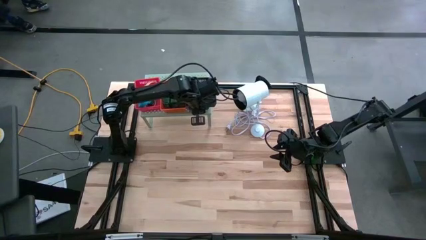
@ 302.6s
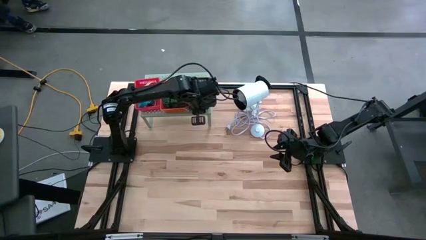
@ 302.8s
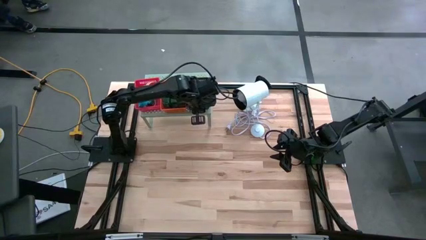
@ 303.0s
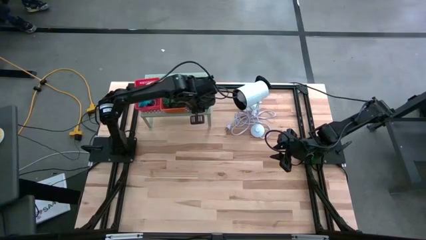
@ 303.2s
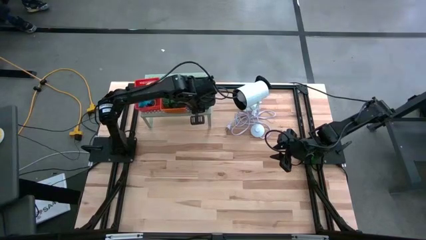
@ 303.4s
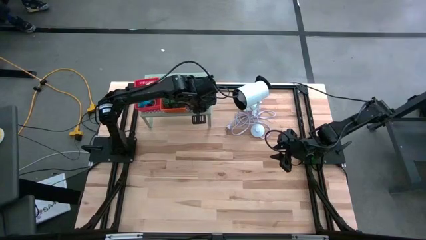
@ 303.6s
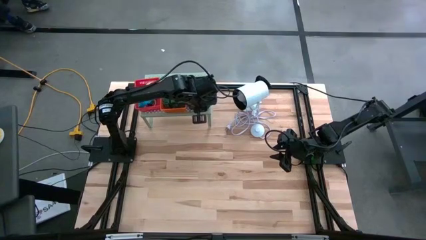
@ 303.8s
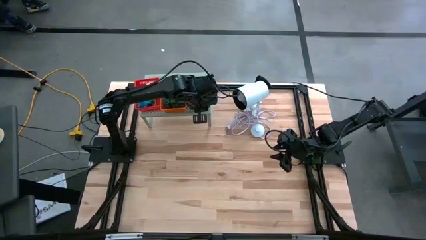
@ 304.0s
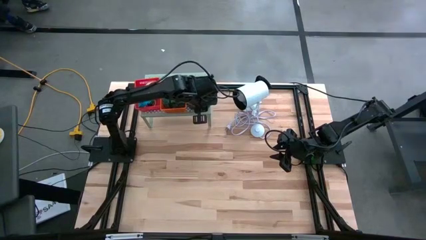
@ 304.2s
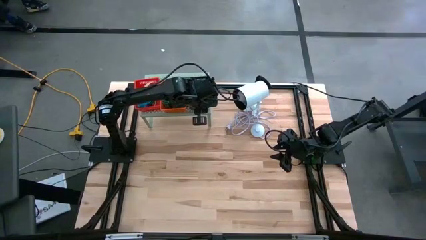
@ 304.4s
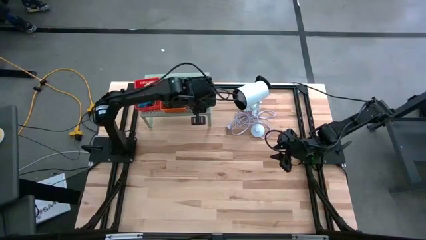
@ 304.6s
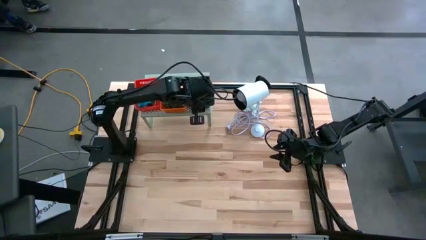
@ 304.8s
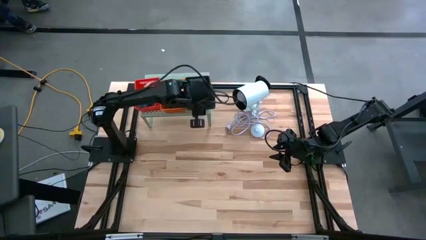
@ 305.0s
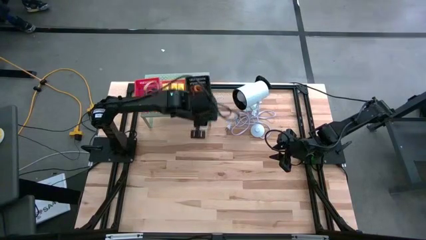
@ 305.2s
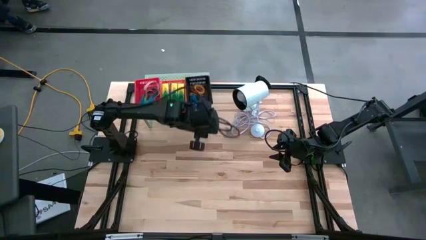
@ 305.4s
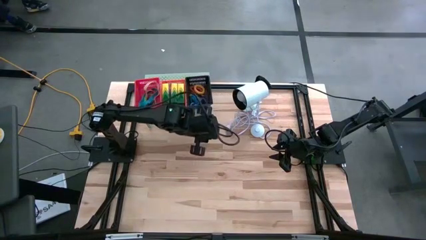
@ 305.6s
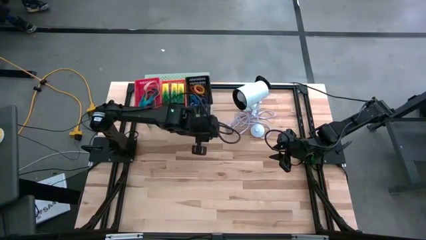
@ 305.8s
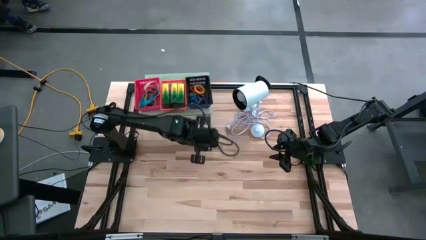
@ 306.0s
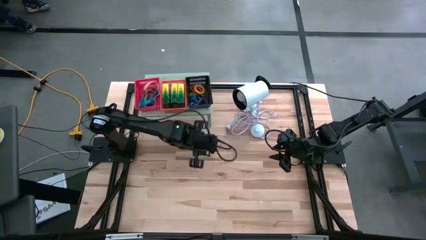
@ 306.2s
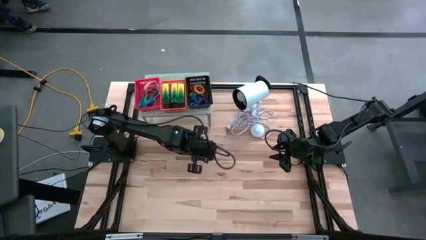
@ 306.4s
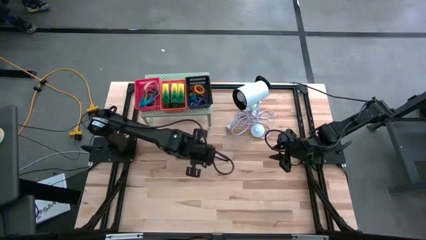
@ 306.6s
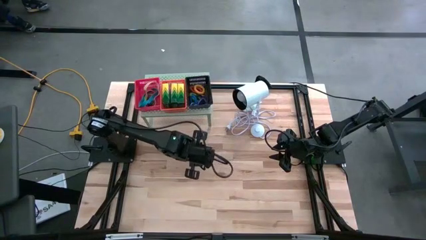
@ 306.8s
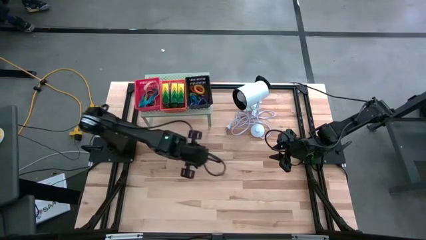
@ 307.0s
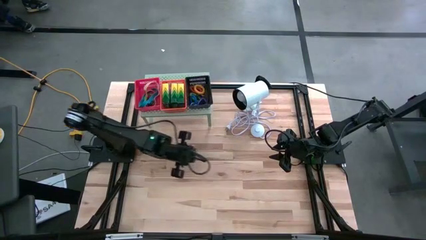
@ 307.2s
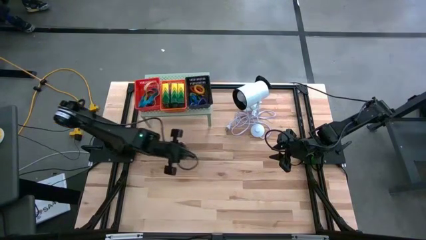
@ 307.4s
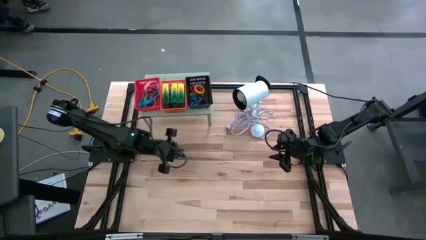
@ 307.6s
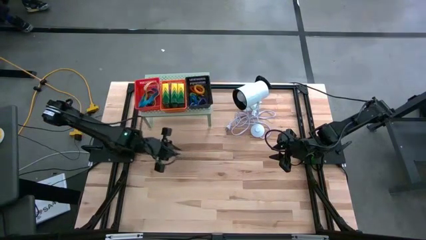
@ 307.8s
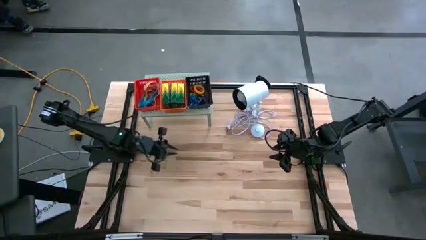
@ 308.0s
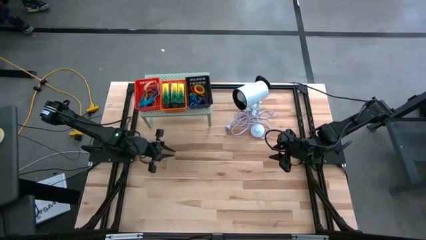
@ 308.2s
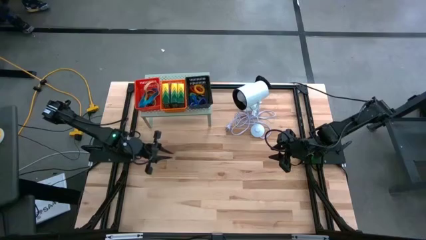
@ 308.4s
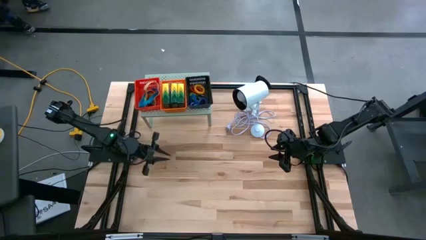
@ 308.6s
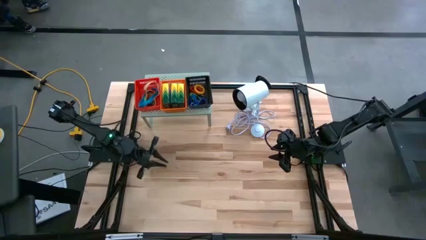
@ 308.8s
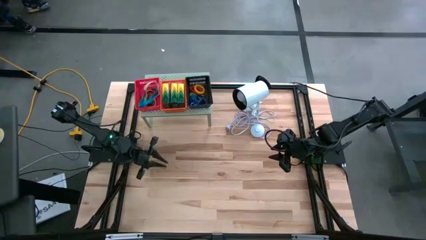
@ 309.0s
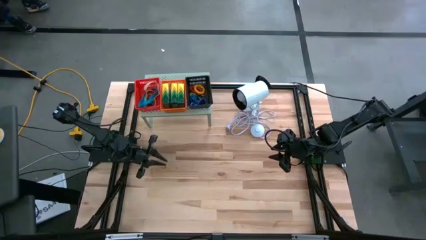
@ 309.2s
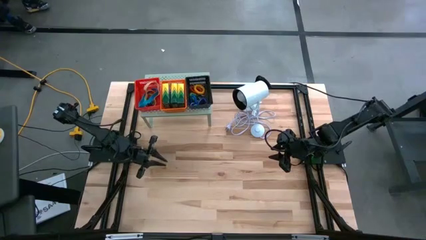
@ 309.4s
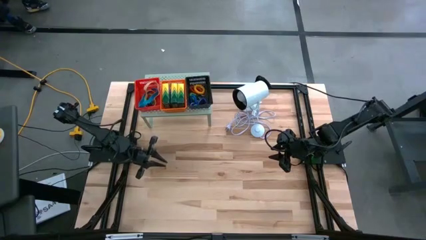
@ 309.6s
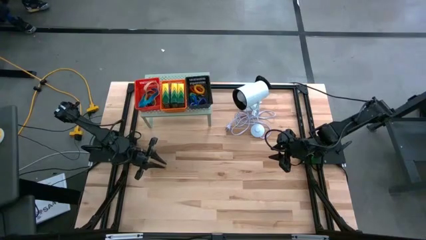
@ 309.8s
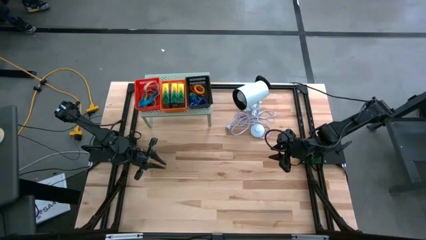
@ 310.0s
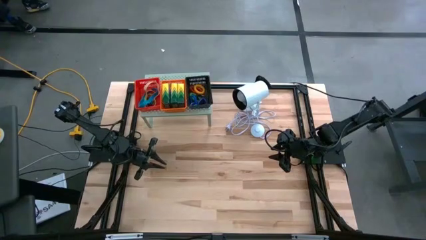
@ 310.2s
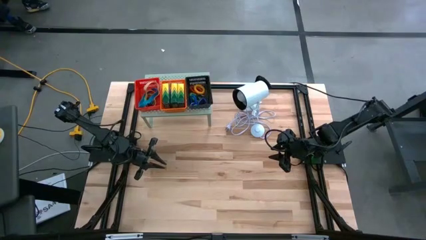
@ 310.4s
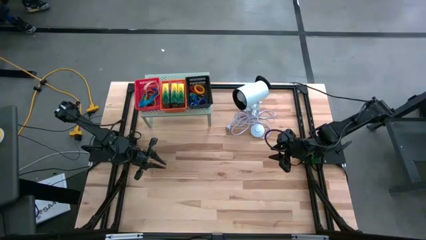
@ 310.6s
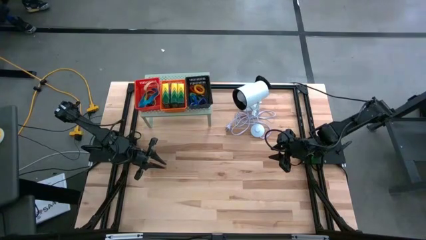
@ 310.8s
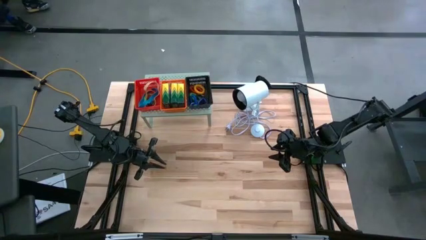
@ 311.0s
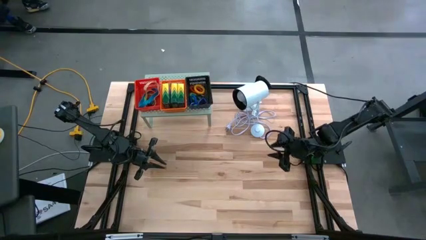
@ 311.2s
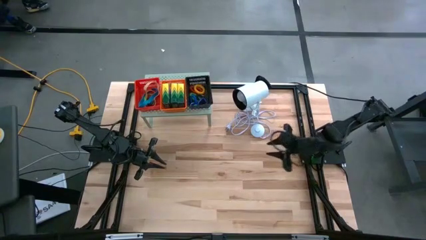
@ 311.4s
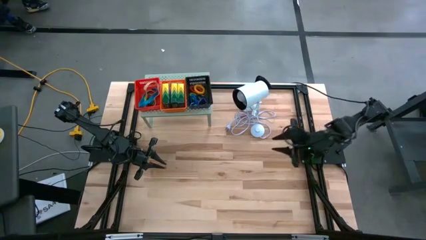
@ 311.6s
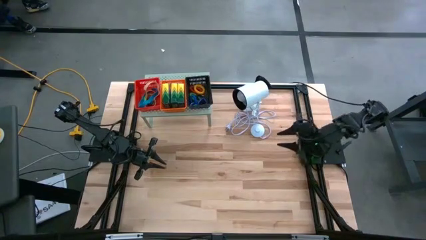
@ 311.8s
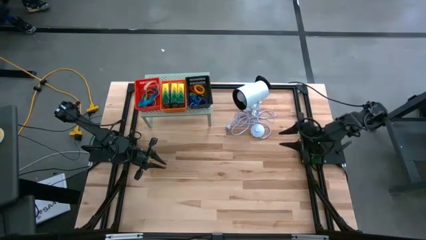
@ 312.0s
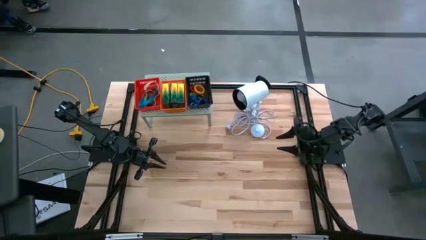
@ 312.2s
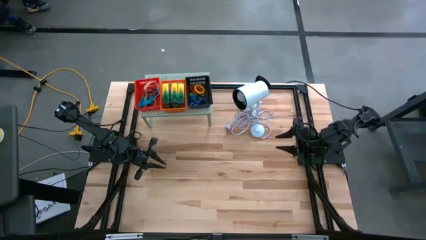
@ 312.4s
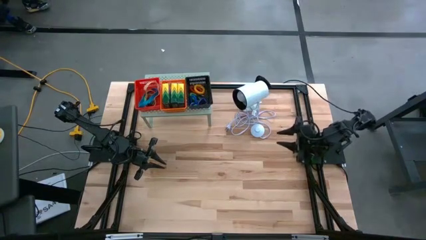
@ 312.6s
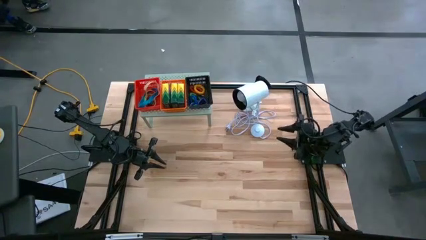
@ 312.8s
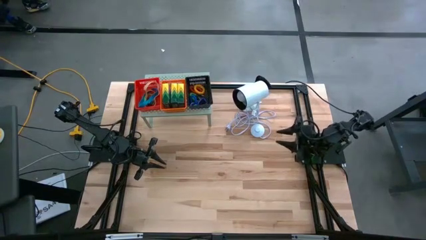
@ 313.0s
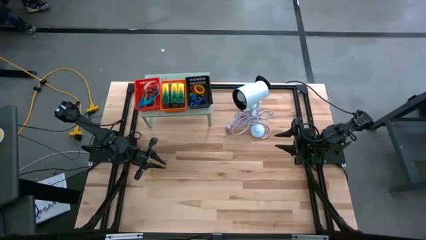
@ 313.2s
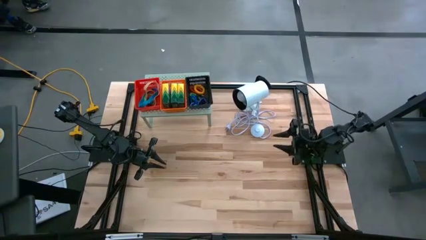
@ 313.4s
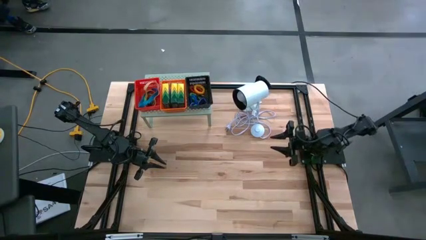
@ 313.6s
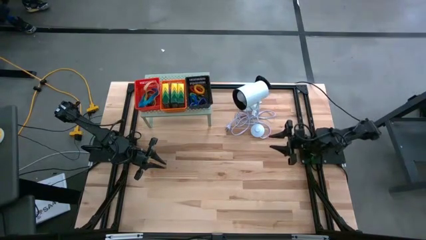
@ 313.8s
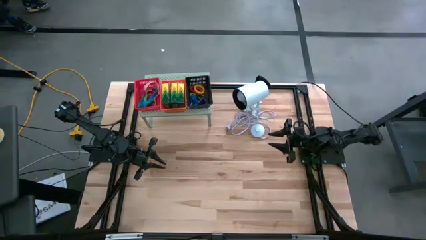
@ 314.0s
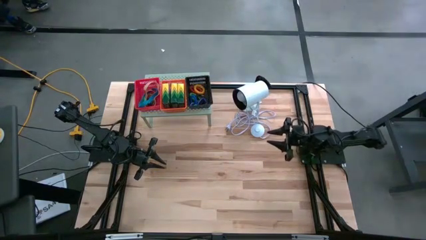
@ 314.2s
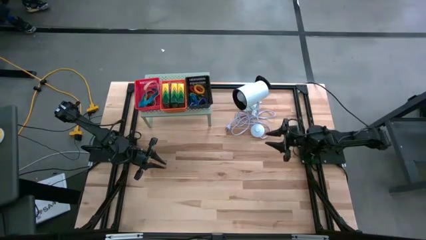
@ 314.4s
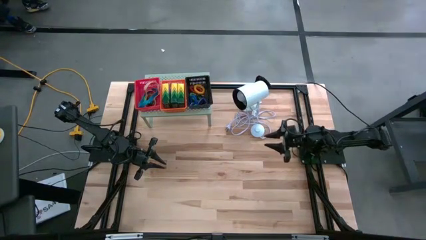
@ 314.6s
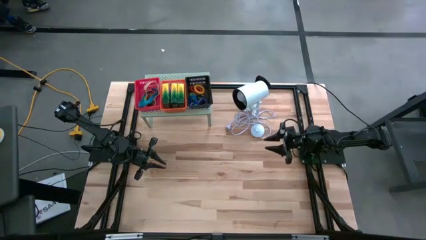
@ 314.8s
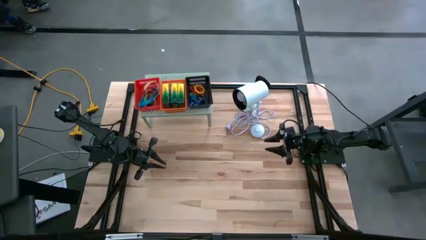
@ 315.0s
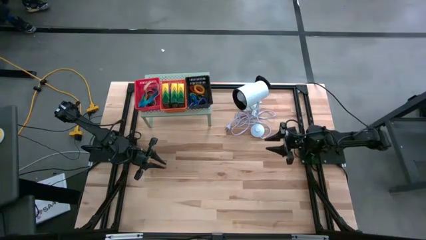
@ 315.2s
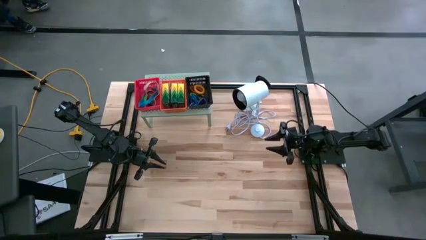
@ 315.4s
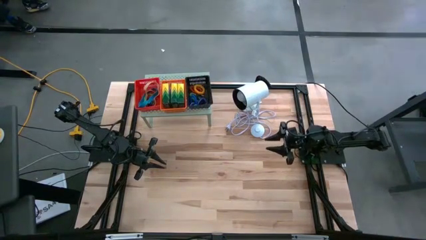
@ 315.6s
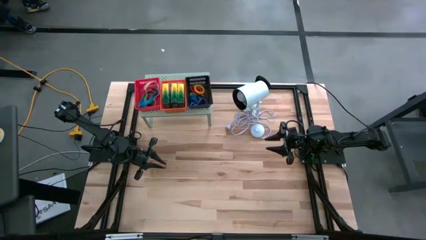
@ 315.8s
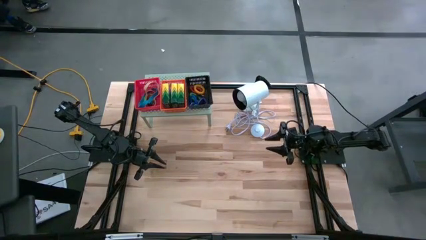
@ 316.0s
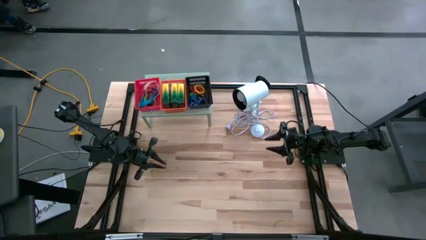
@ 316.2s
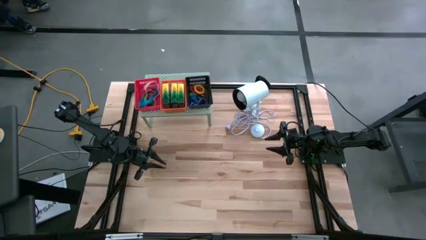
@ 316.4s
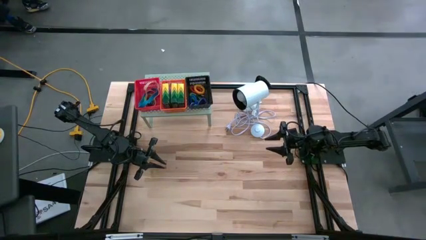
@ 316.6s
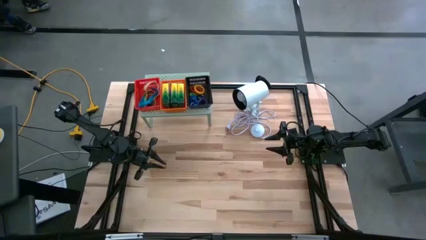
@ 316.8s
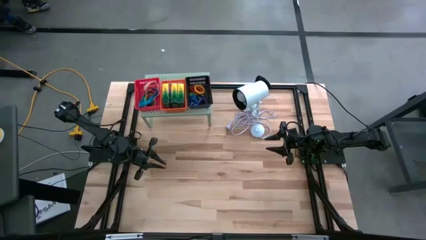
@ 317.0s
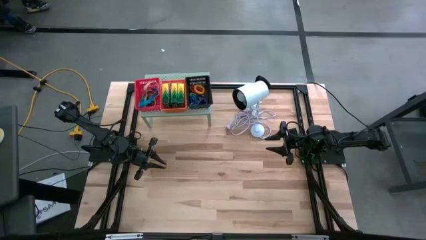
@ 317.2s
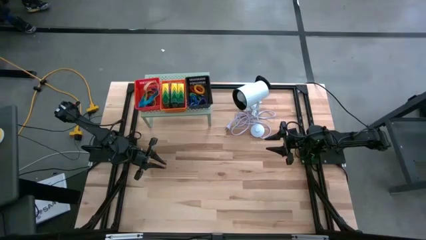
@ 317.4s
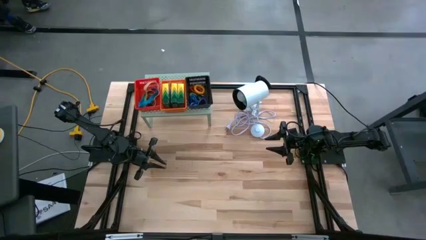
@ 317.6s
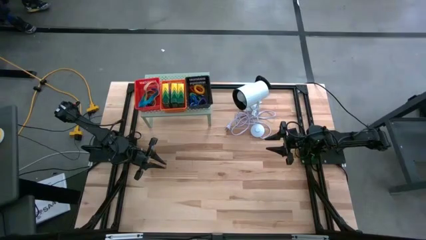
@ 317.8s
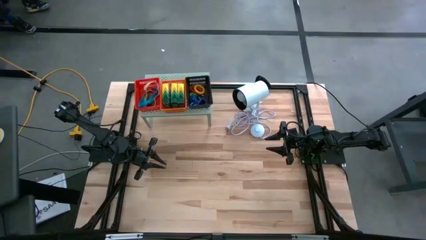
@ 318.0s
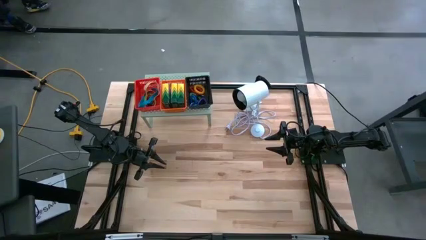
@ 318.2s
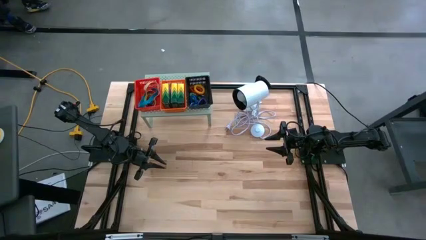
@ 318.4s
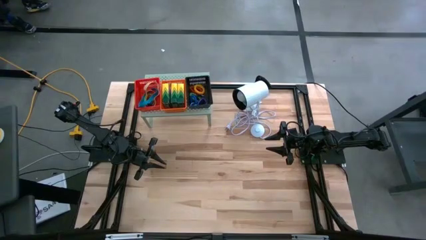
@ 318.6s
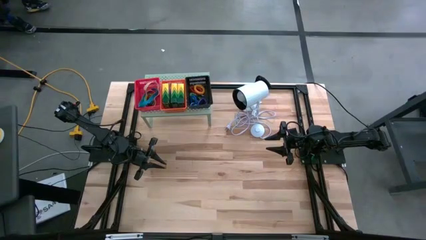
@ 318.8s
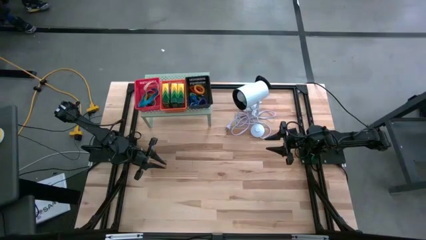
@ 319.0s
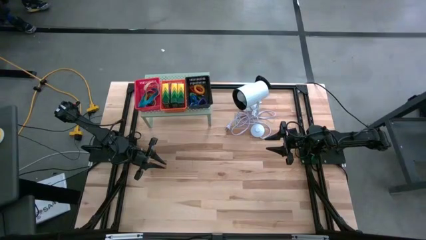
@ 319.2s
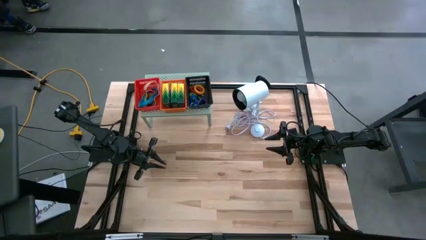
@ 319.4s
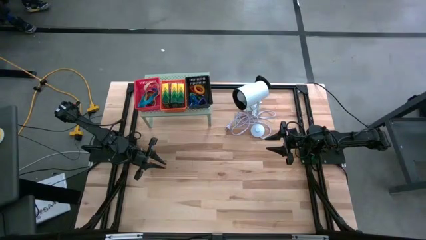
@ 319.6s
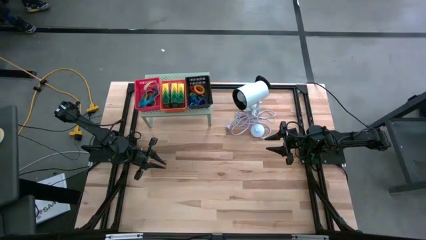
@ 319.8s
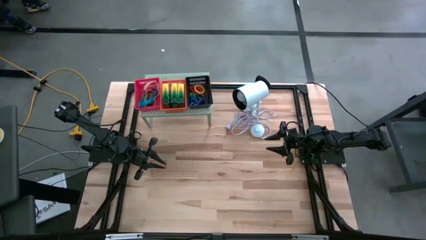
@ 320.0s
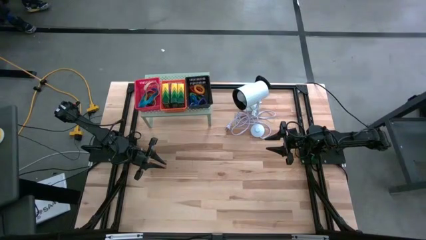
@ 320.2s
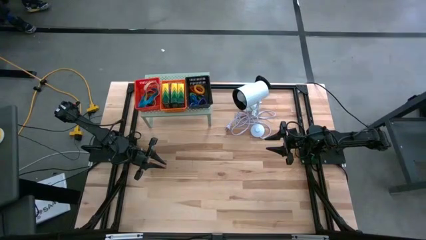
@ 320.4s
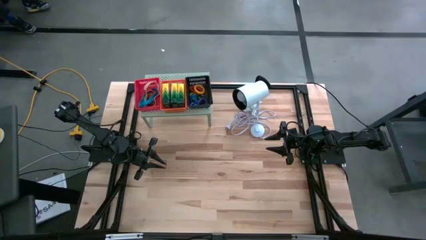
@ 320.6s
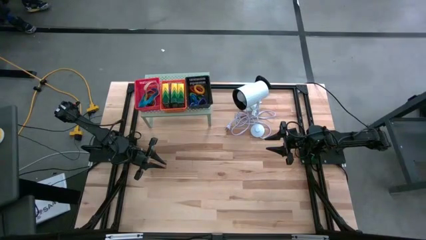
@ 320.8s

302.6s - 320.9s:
Task: Pick & Place Office Desk Supplies
Return to Home Position
